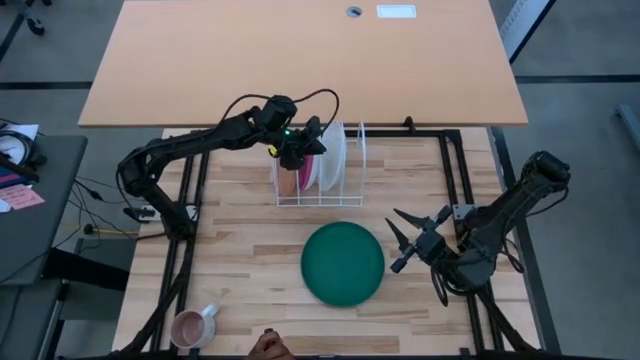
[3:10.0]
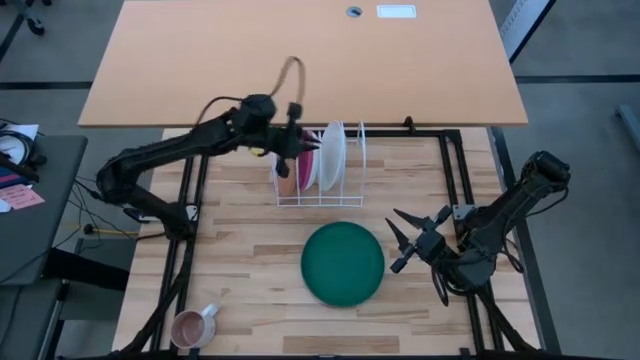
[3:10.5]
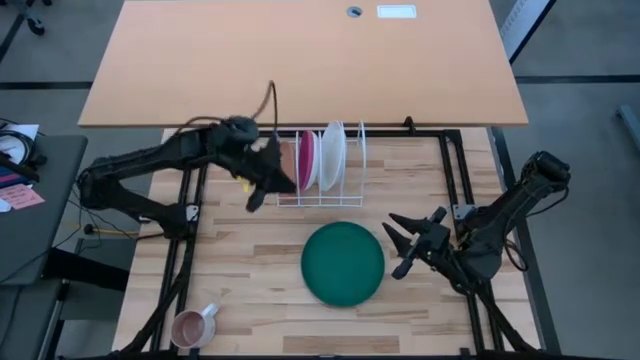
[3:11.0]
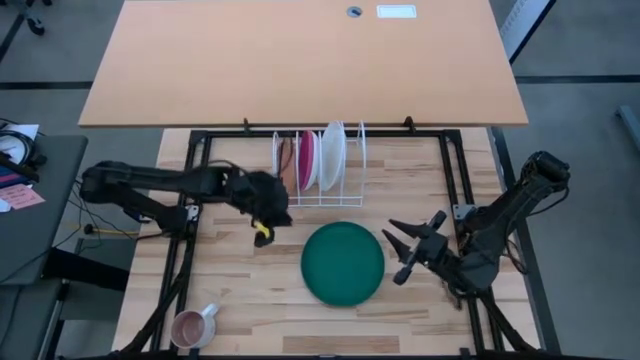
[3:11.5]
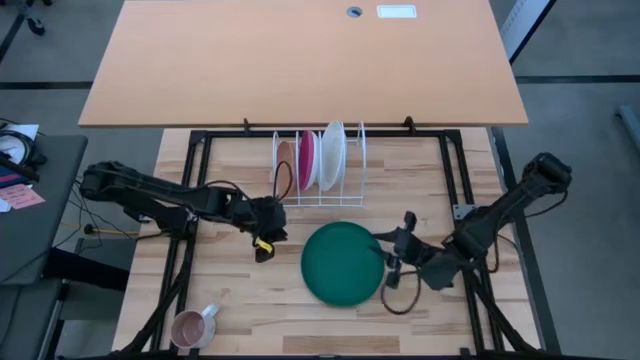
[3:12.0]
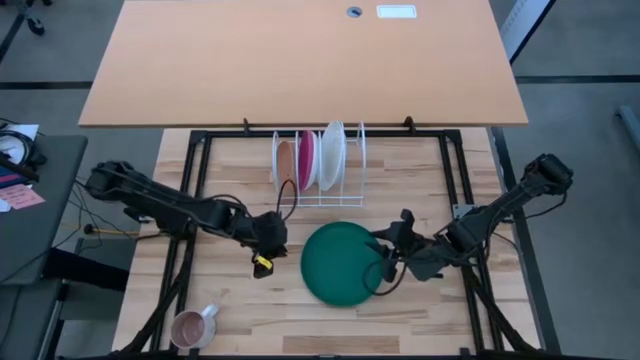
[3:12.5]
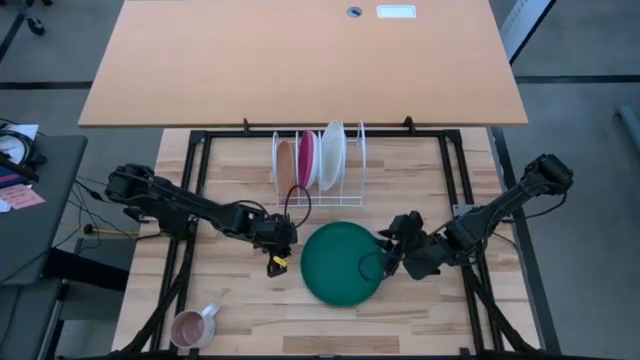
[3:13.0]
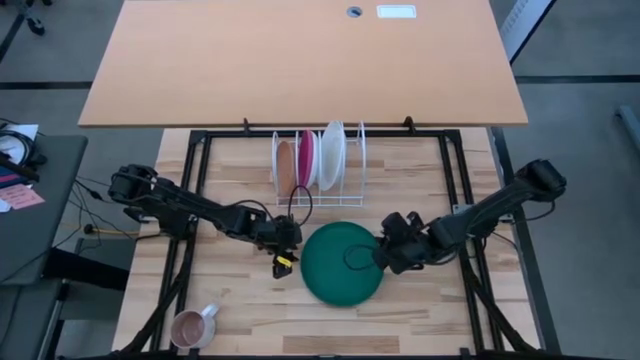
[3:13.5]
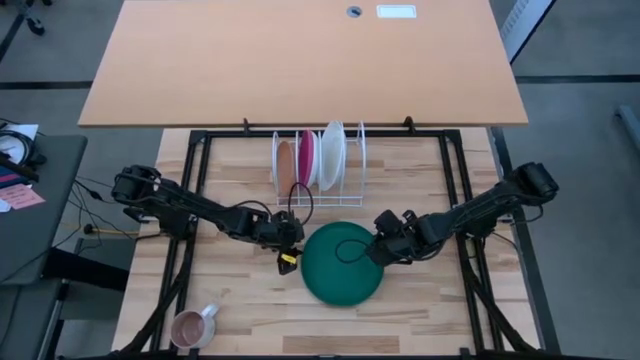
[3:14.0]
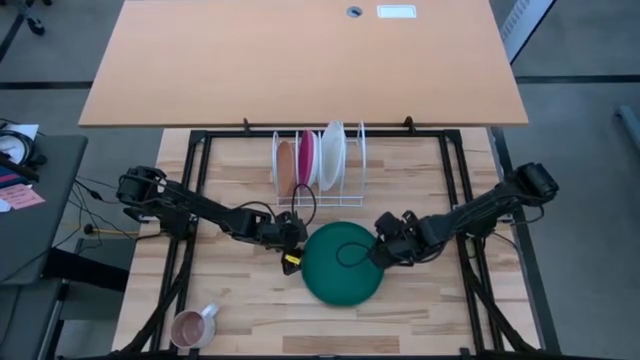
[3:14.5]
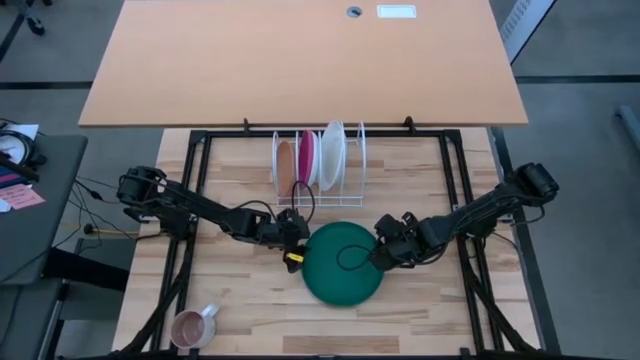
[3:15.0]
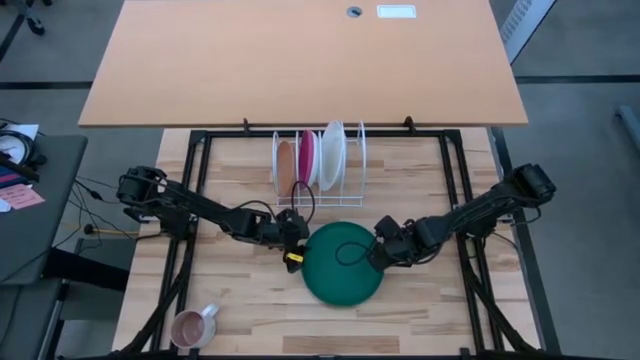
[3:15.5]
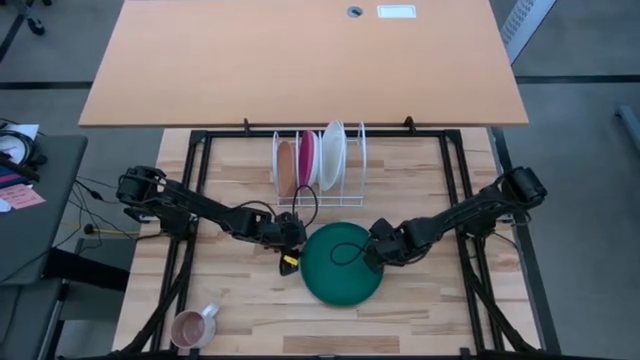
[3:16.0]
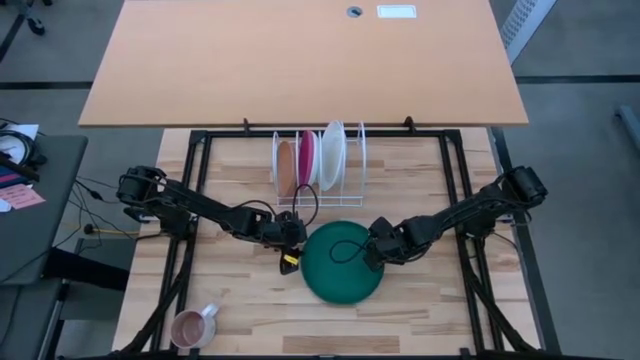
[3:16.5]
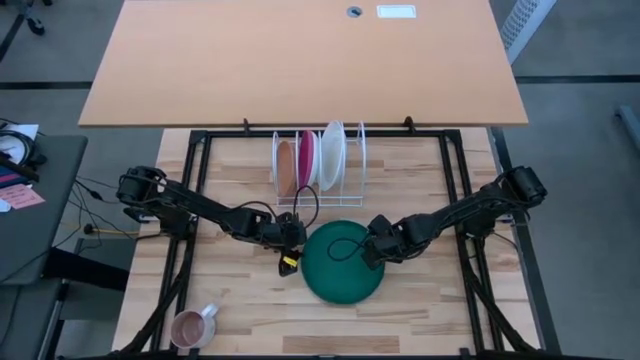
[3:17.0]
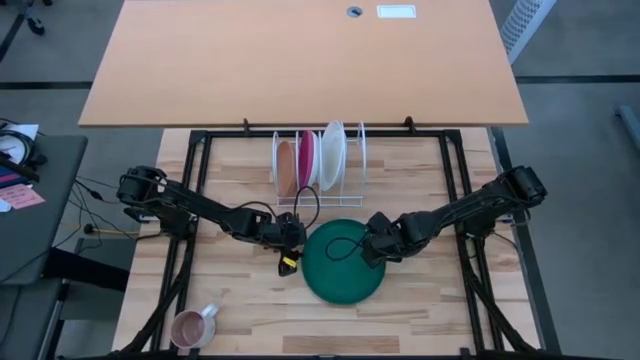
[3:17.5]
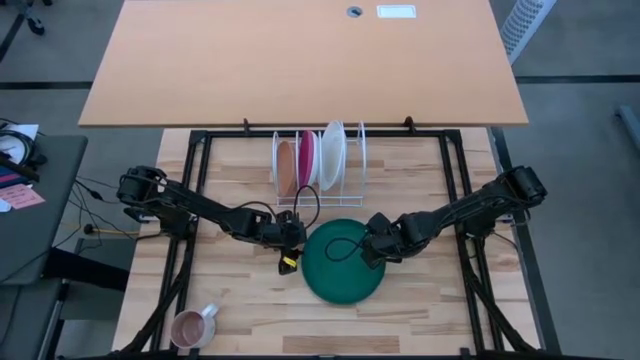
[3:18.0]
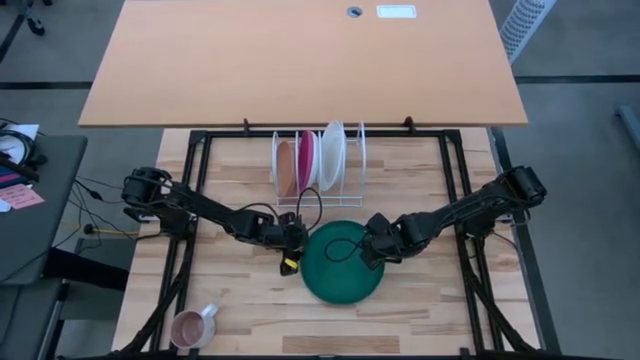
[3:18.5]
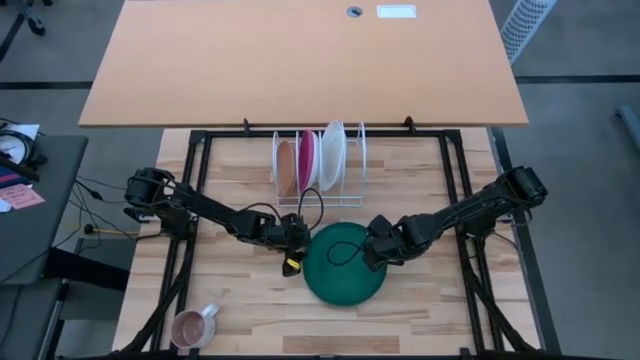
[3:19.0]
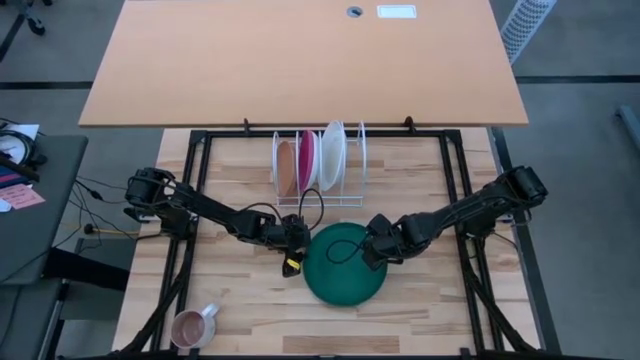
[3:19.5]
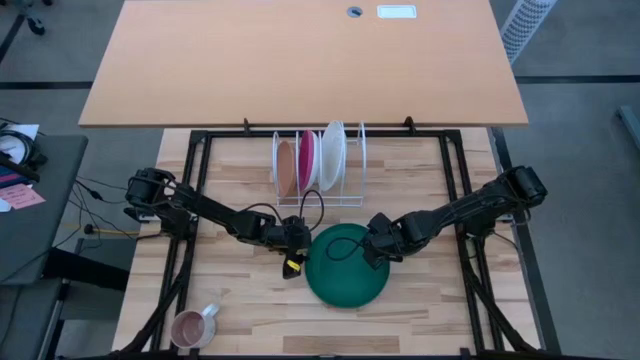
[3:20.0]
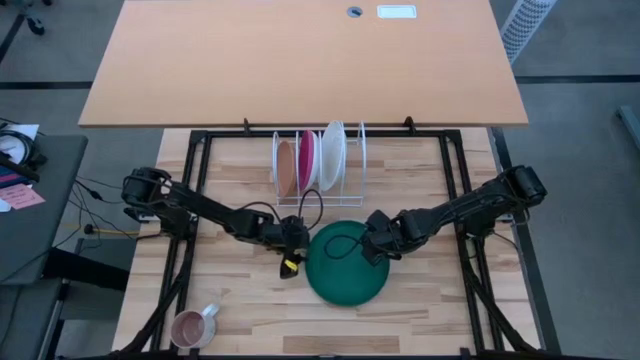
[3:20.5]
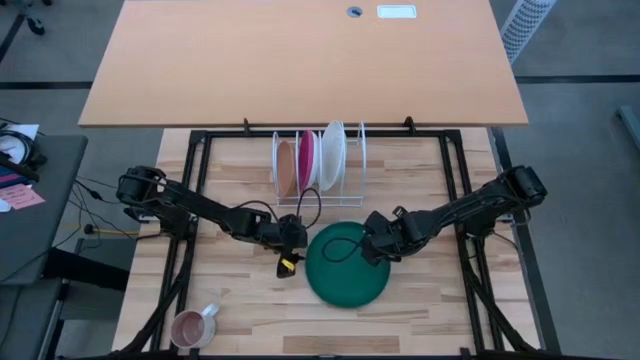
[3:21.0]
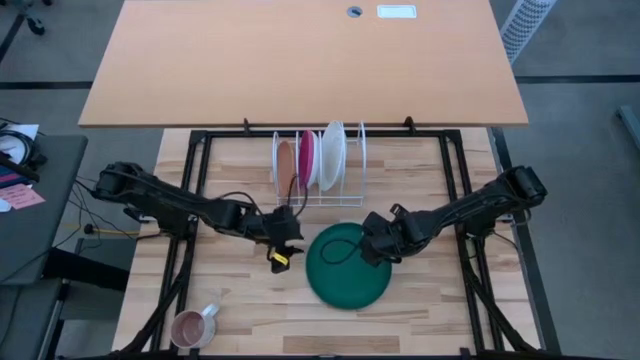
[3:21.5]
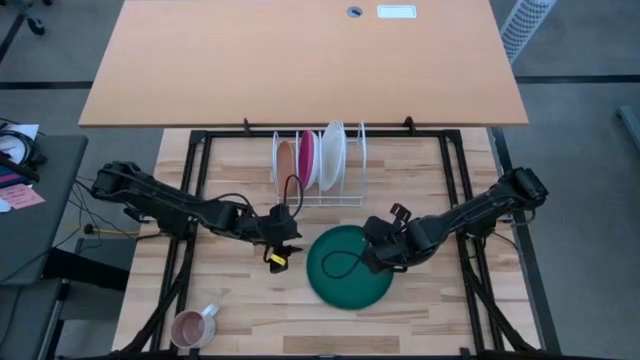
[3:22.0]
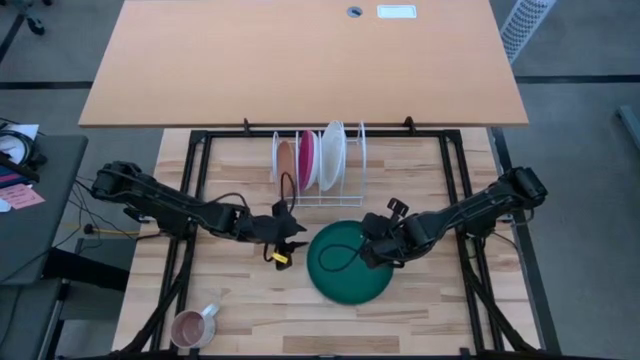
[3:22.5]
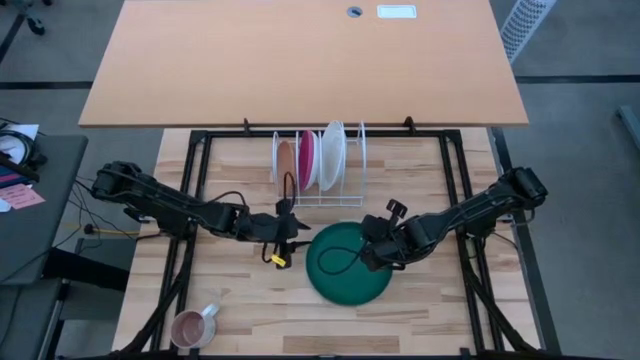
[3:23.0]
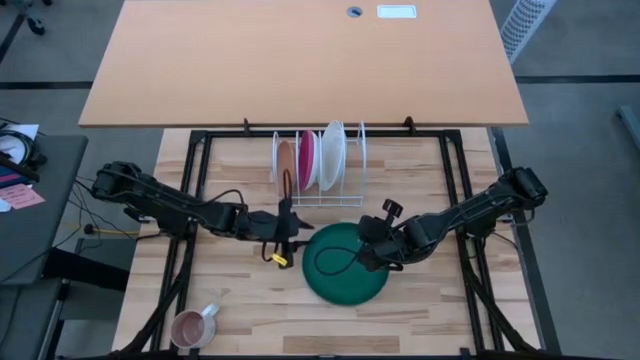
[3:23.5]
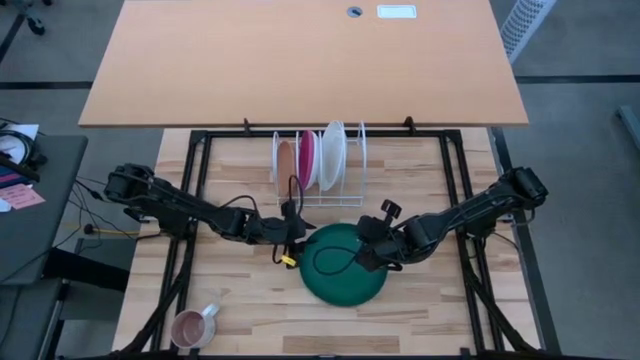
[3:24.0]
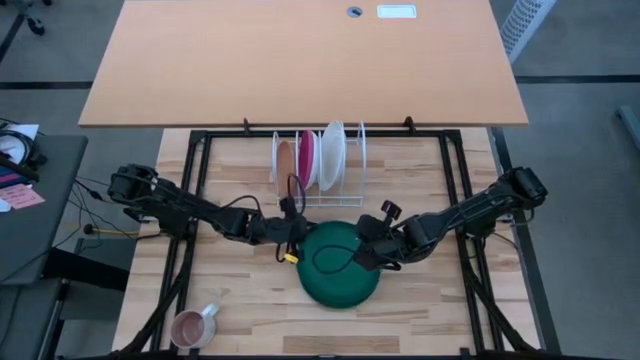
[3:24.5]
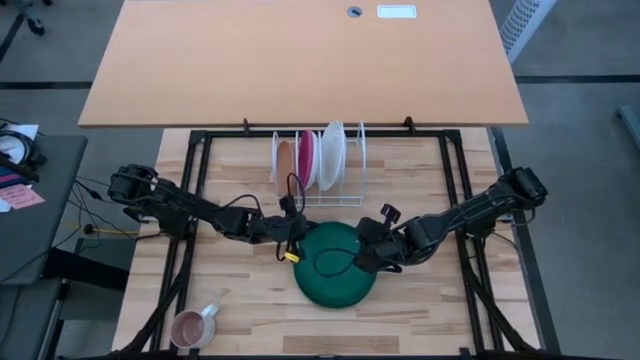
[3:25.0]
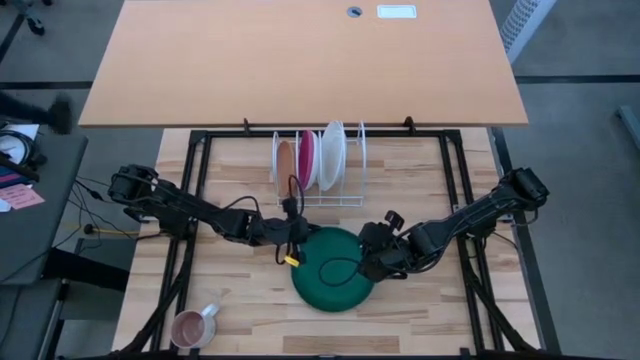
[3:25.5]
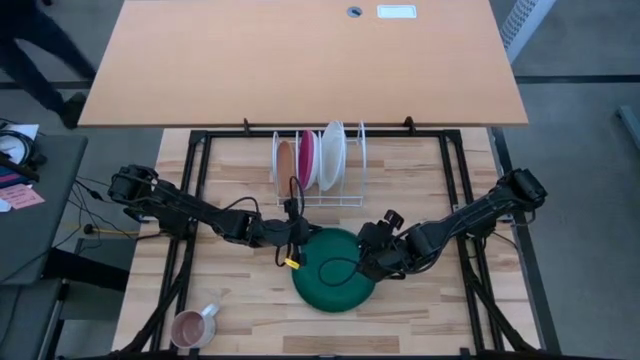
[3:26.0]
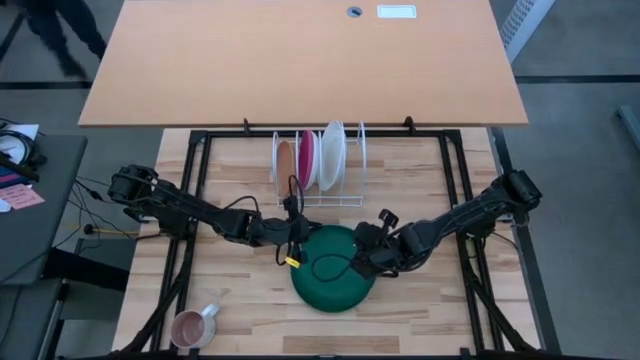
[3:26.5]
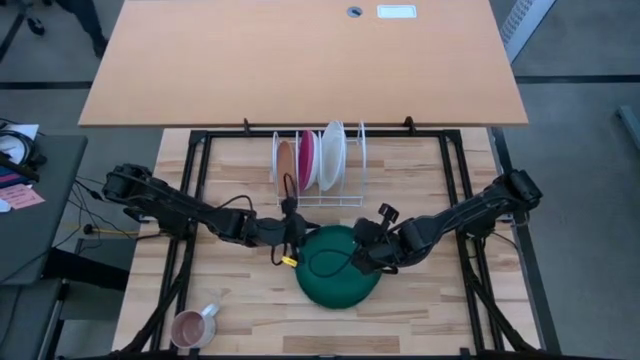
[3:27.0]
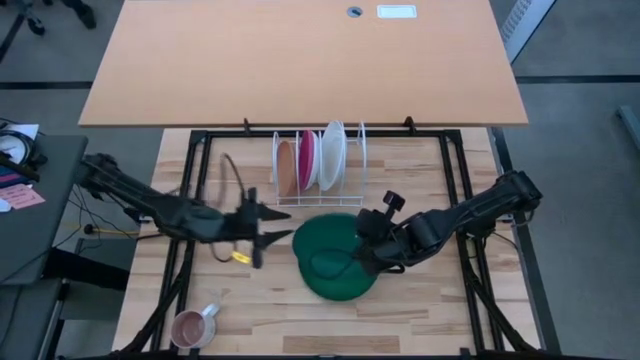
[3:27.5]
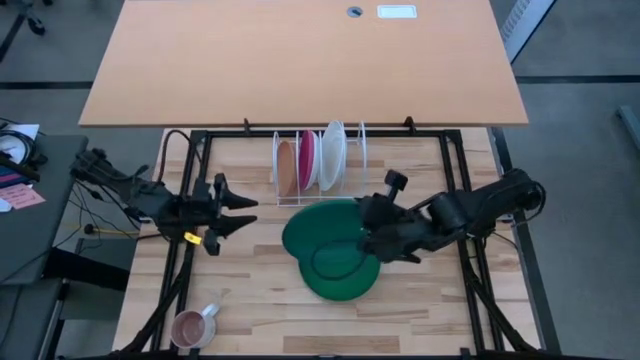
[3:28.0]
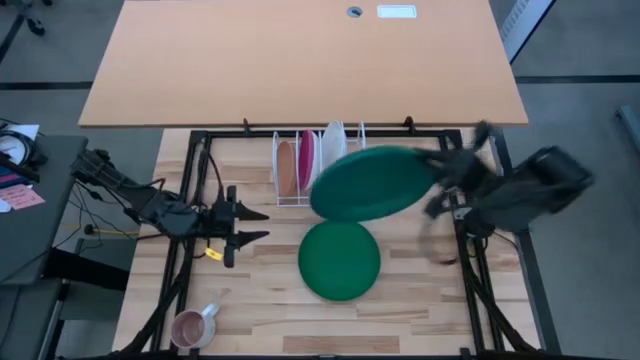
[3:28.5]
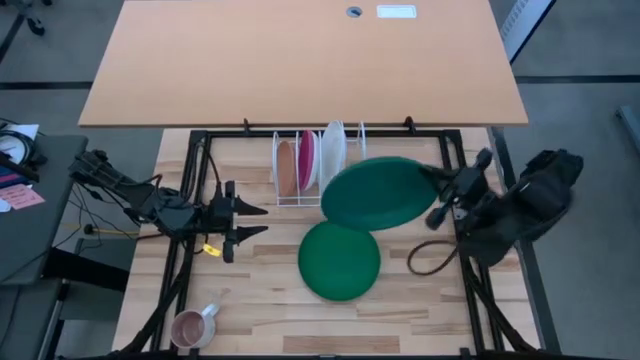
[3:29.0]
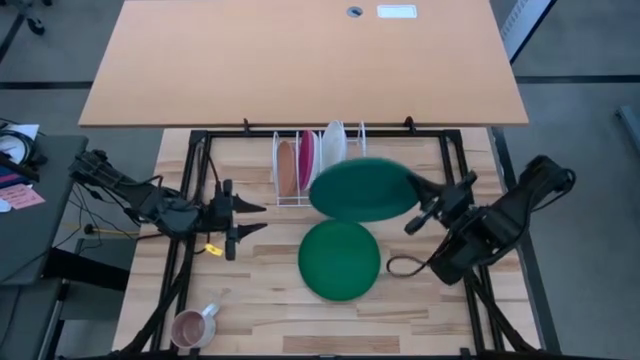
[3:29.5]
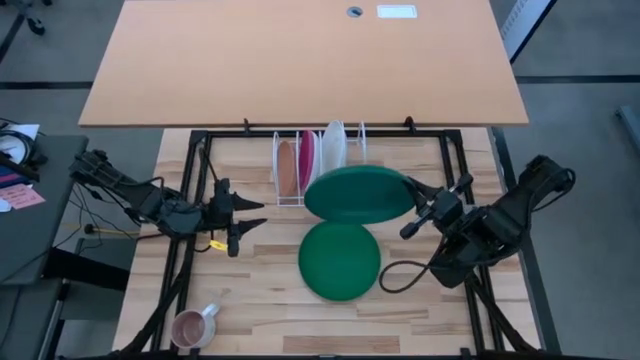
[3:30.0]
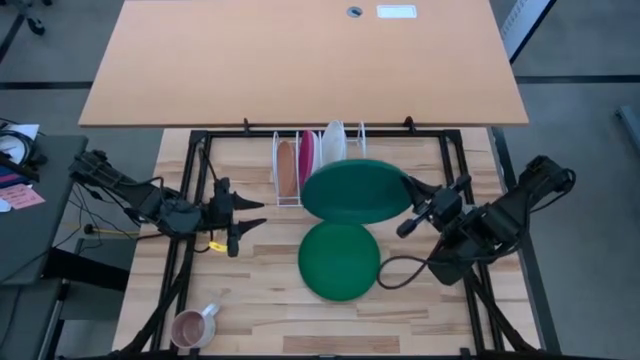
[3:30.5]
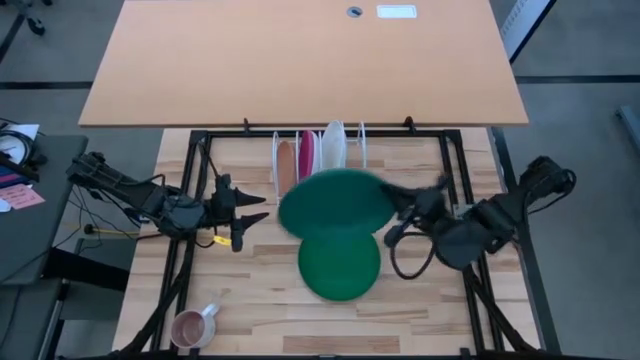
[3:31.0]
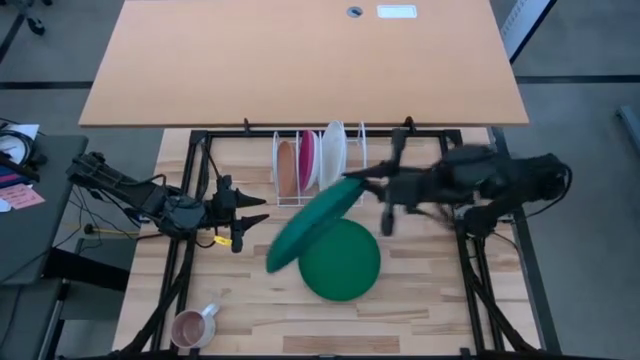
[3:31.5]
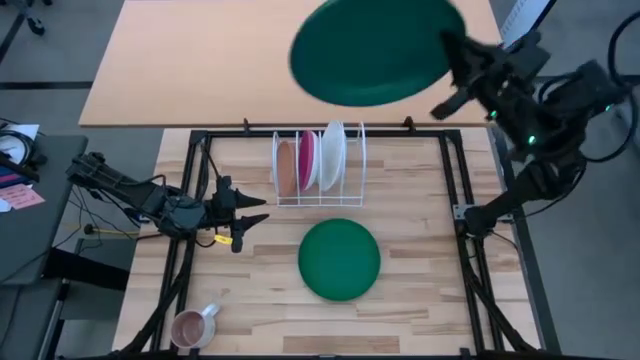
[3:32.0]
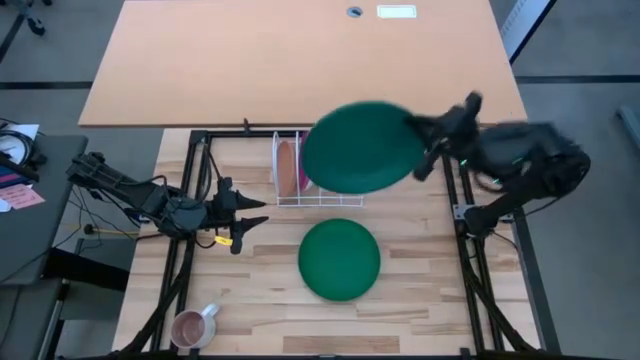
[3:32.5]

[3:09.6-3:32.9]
Task: Sort dishes
Put the dark green plate in the dish rack
